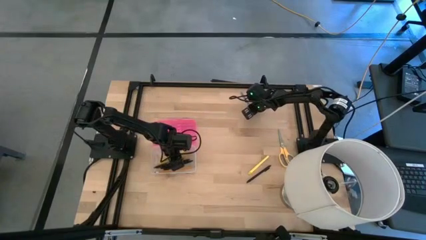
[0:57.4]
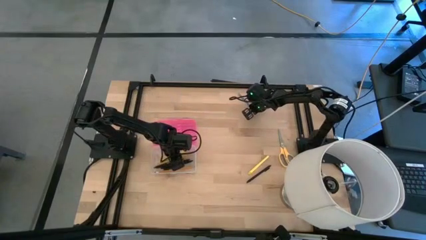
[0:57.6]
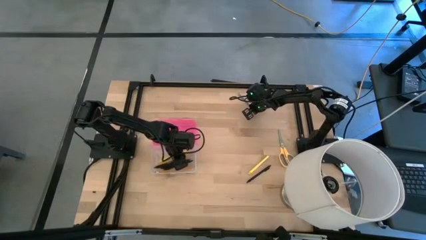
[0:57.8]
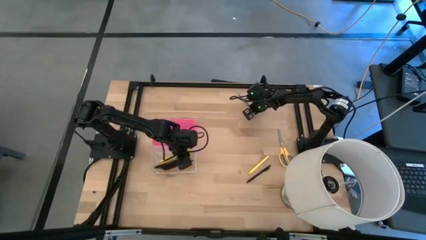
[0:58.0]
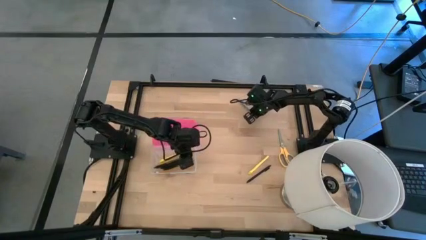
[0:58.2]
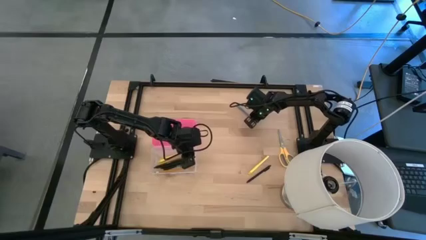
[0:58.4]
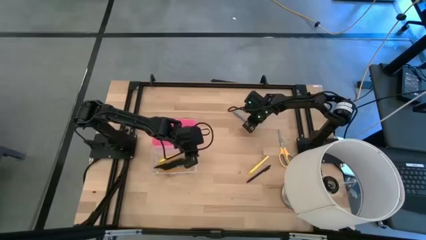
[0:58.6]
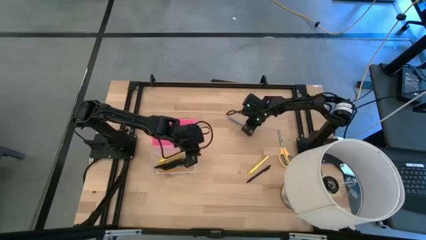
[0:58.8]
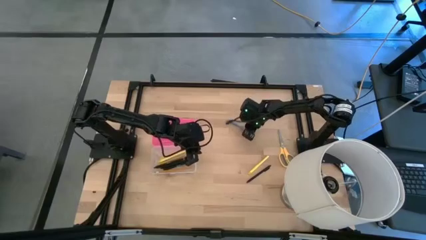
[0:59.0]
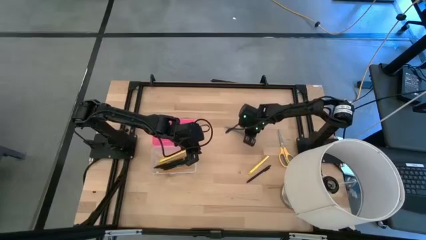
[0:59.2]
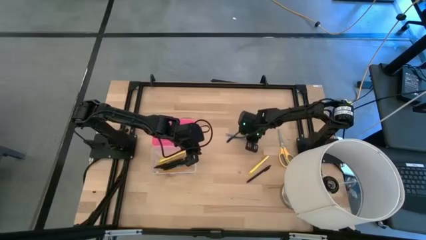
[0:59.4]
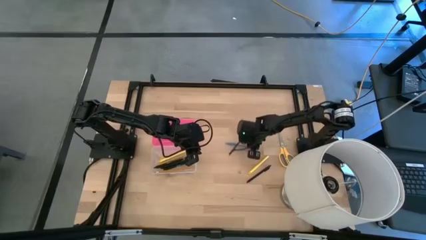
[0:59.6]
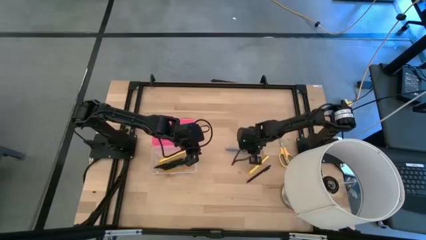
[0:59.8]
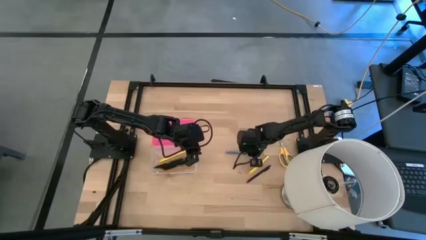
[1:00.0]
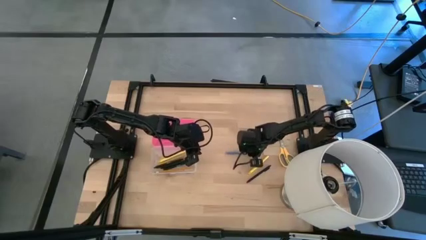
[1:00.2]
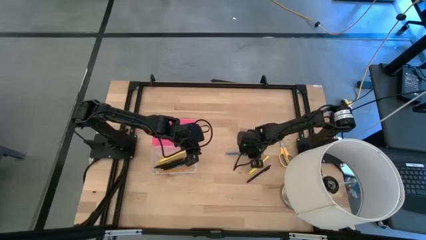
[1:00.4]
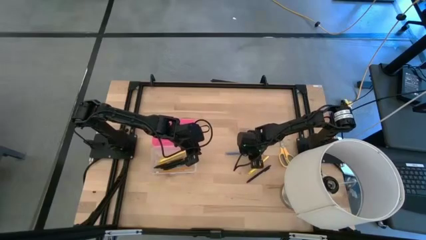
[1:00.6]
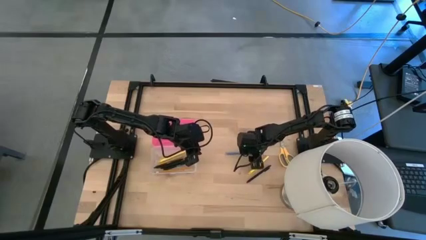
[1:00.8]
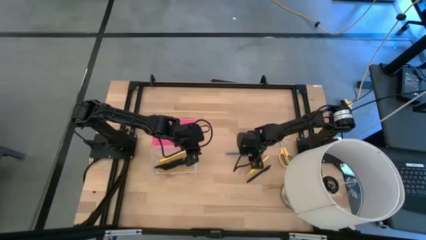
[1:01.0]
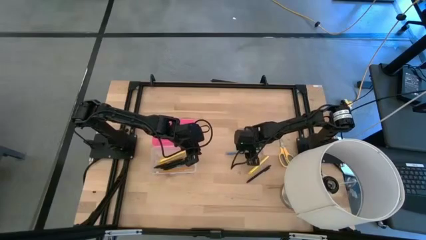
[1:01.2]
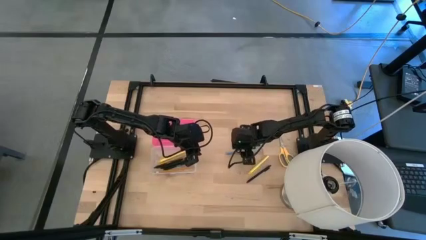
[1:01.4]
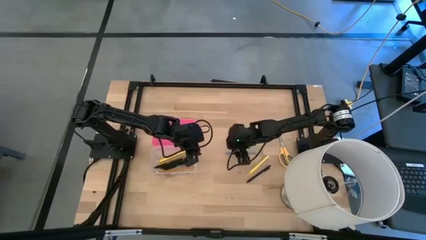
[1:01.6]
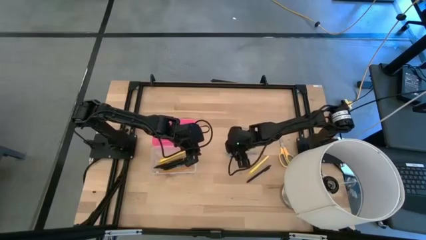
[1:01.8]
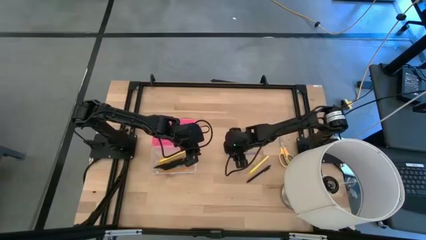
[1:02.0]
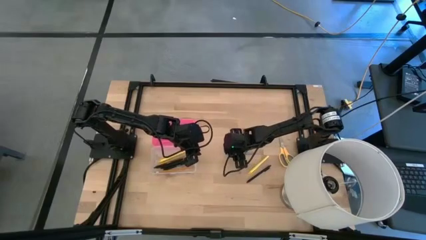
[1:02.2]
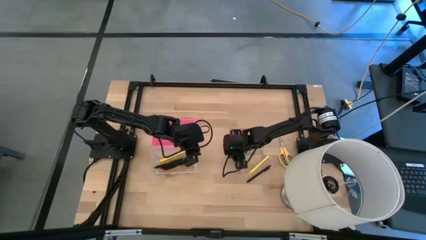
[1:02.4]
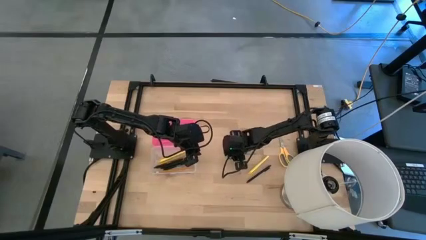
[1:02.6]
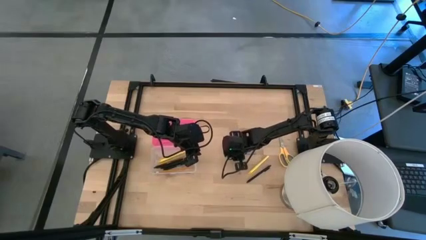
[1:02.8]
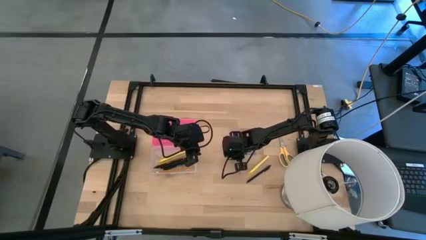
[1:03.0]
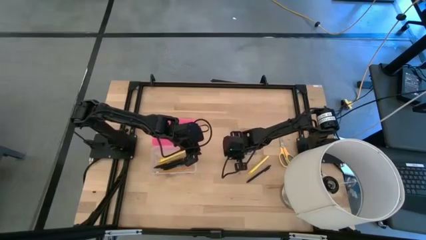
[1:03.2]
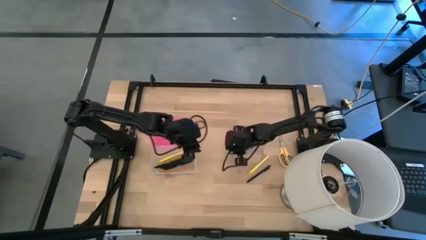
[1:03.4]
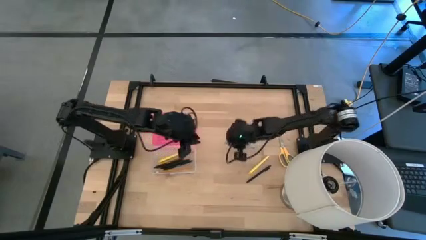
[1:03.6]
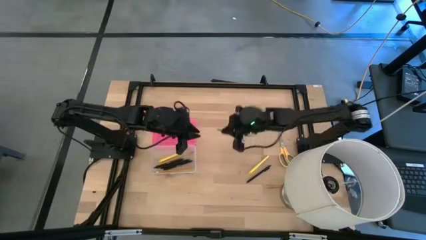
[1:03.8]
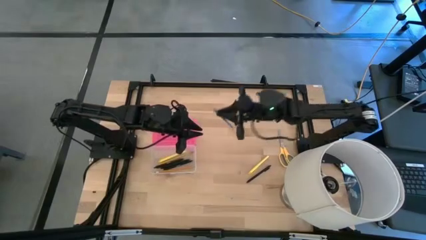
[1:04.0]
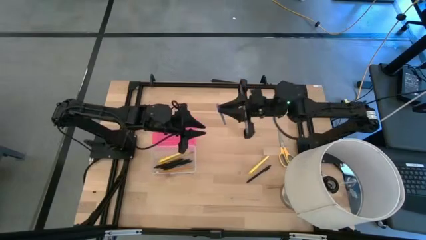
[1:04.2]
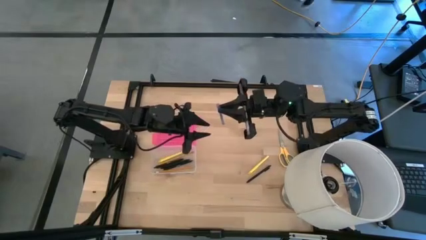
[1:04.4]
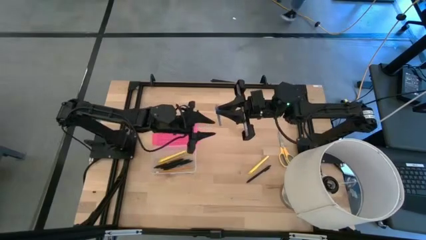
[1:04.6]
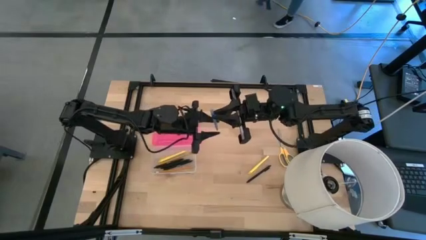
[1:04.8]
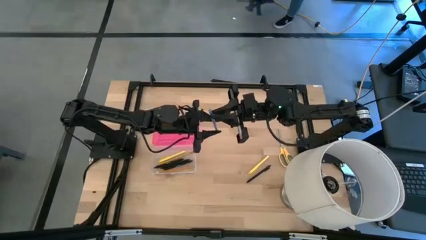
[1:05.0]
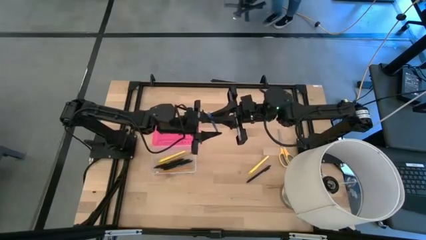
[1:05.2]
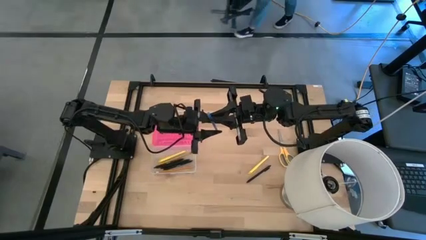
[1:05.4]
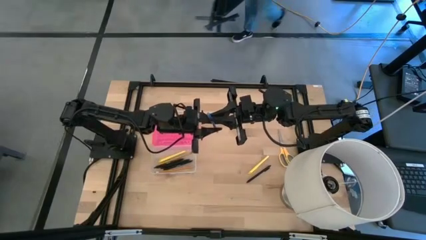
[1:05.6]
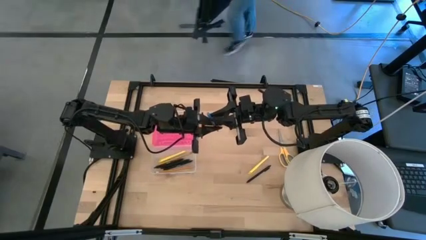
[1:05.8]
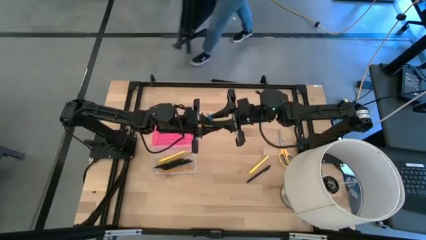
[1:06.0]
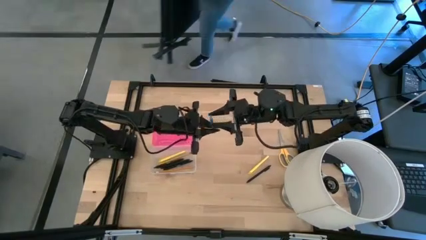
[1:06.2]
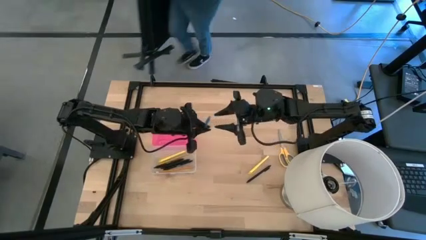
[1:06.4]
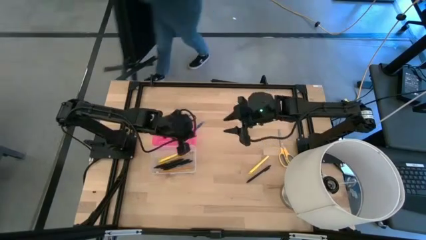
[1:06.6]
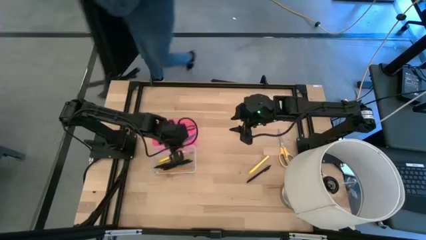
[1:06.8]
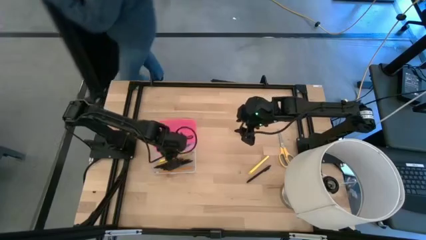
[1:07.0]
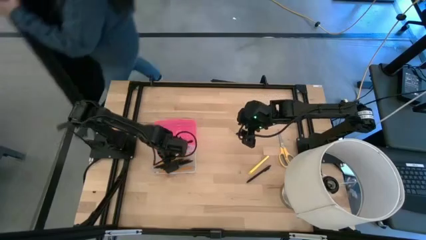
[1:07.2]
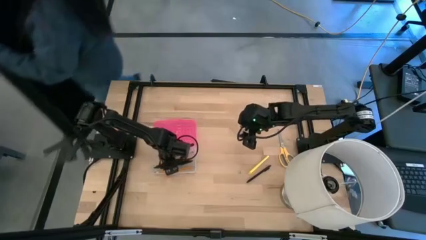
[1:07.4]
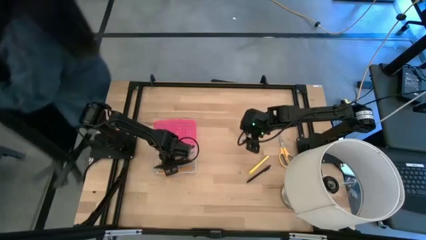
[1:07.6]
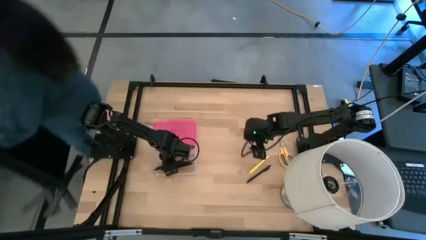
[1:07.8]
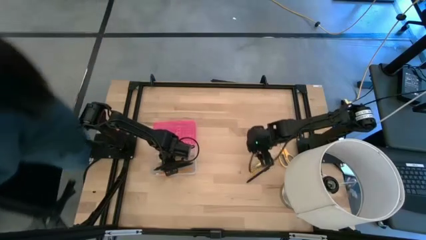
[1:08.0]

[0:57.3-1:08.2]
Task: Pick & place school supplies into a supply box
Put the blue pen into the pink supply box

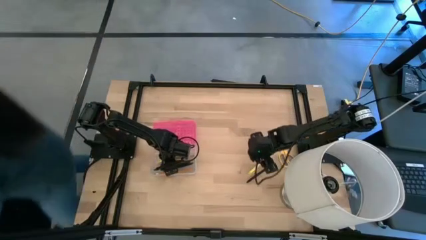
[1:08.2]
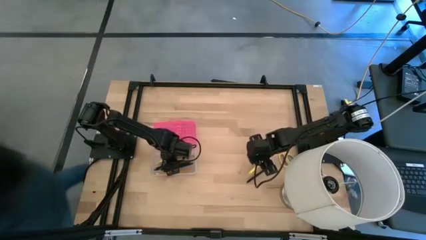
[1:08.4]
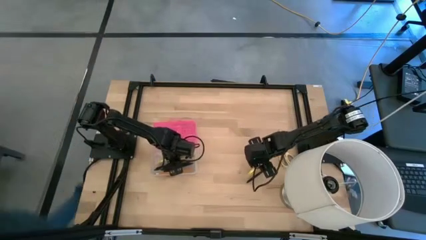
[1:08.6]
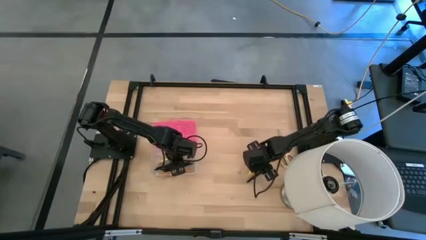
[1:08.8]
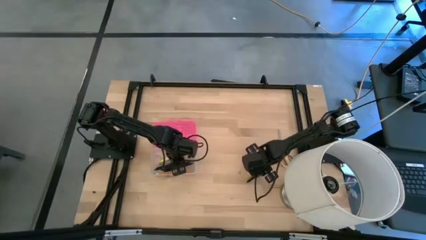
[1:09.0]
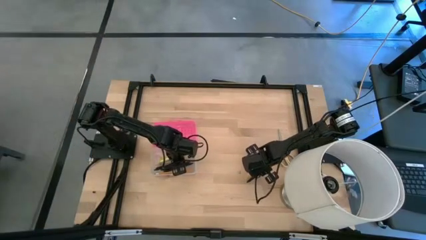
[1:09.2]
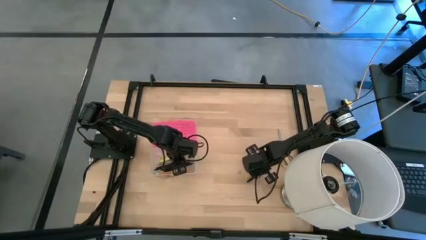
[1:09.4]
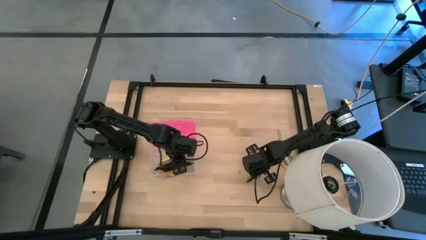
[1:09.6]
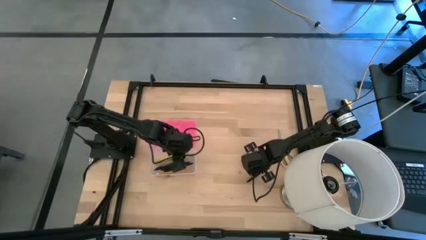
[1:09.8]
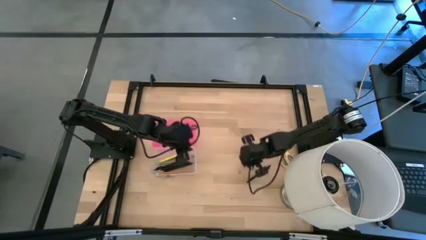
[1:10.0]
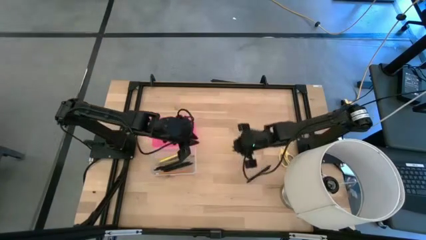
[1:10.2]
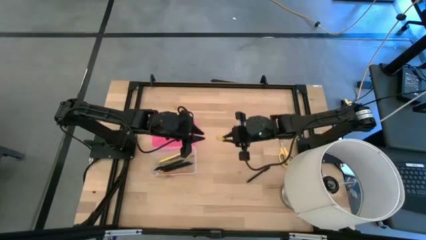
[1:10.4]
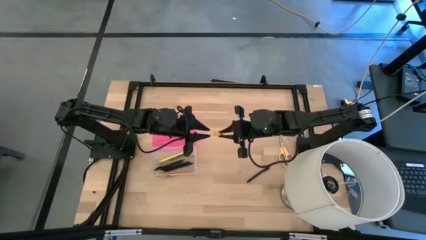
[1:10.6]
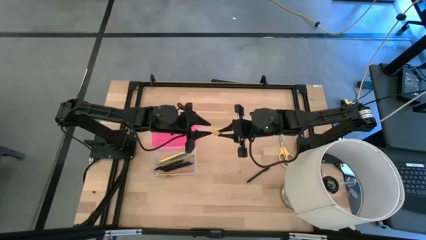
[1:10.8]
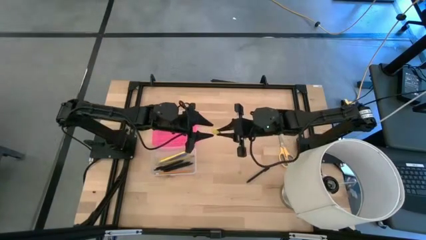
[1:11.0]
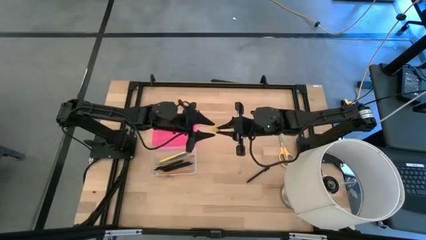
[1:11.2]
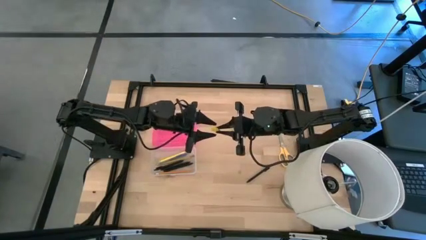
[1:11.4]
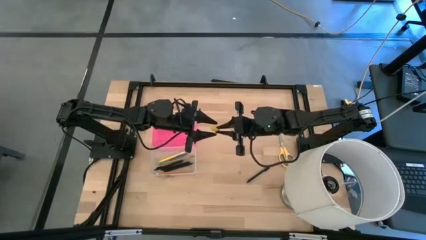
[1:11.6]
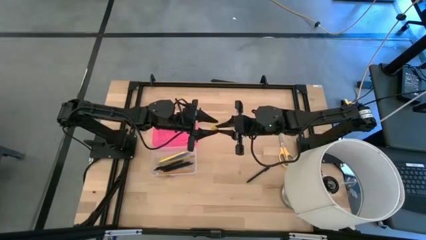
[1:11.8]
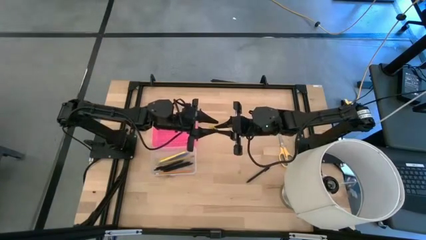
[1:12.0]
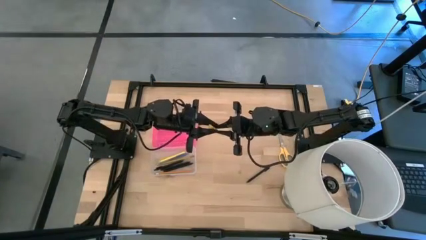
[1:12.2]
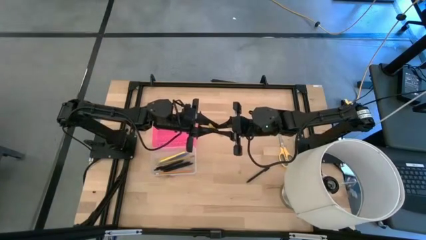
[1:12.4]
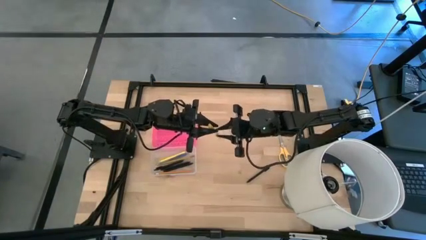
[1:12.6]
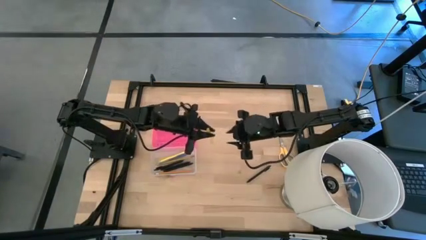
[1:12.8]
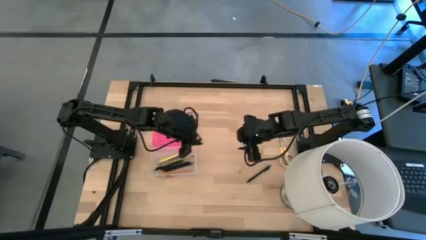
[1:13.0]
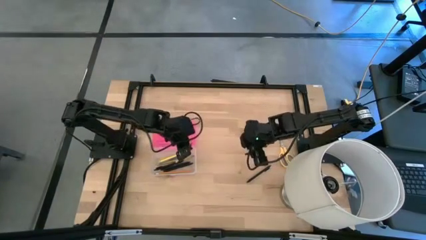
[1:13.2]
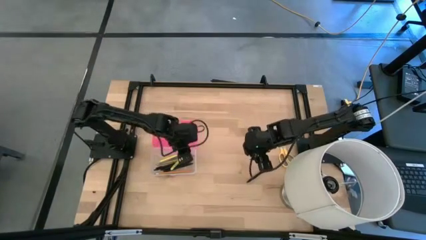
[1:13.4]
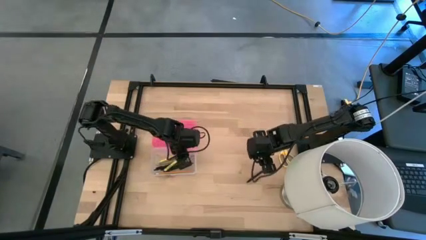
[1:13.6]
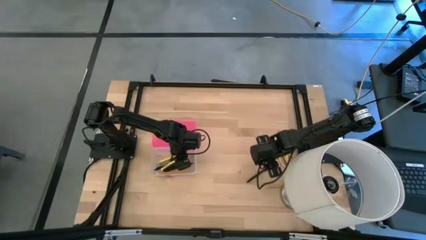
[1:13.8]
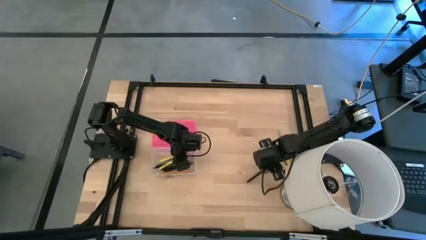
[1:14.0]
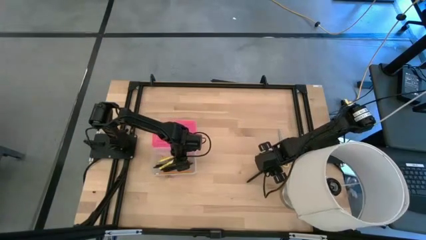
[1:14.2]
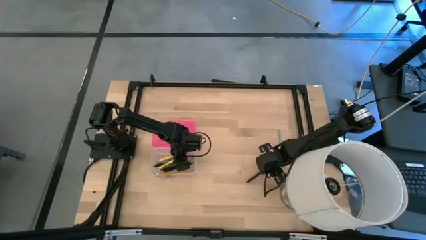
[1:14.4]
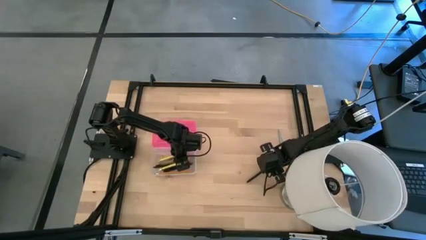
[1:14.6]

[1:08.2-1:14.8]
Put the yellow pen into the pink supply box
